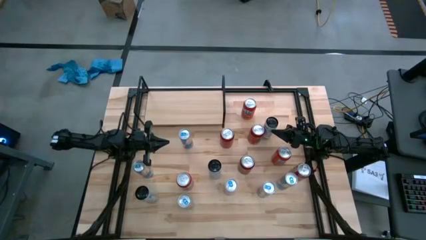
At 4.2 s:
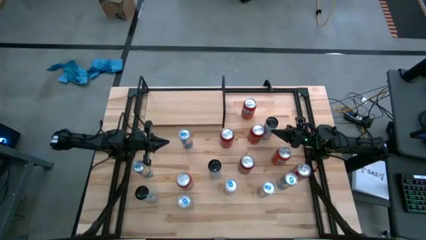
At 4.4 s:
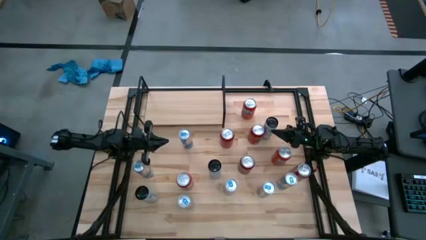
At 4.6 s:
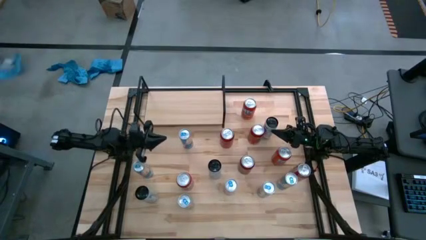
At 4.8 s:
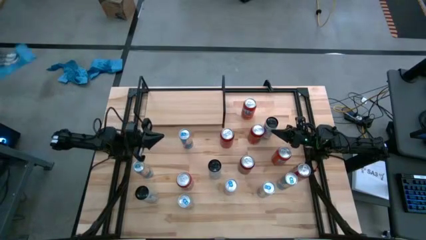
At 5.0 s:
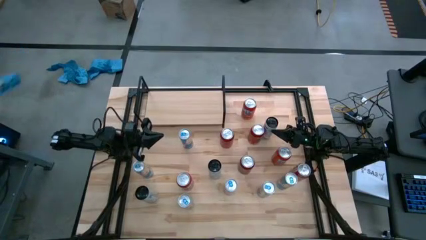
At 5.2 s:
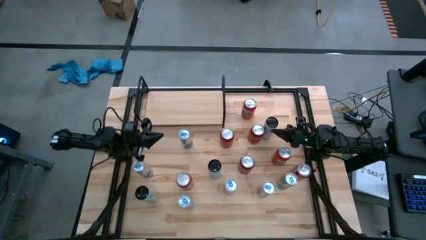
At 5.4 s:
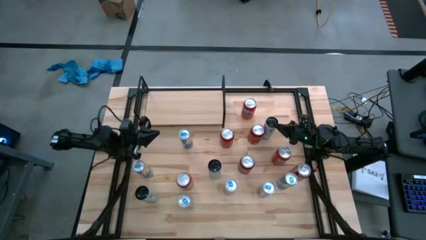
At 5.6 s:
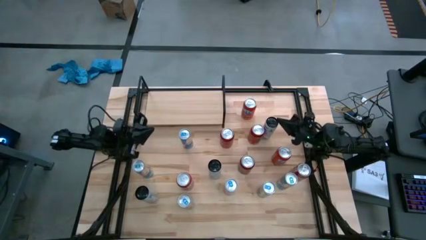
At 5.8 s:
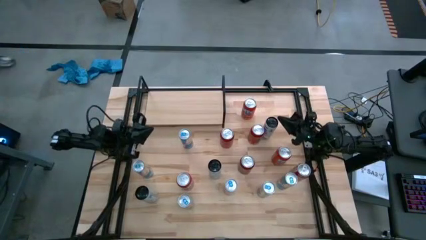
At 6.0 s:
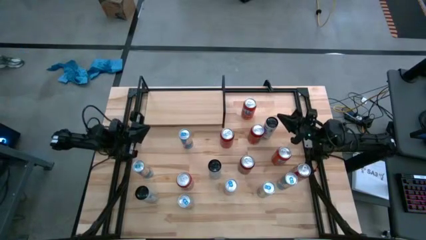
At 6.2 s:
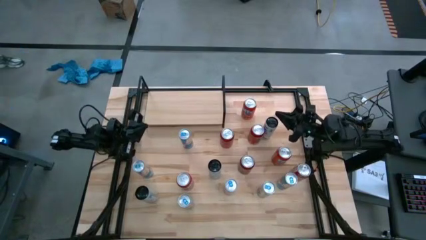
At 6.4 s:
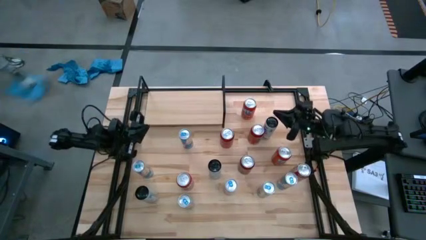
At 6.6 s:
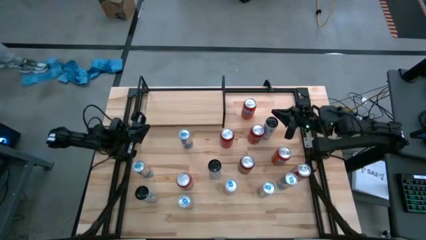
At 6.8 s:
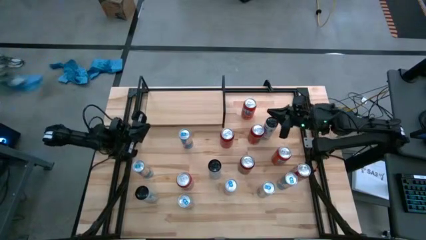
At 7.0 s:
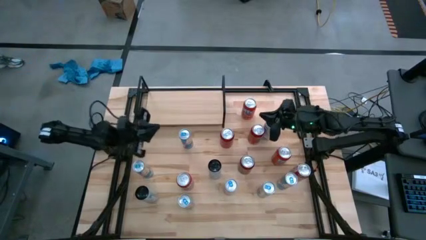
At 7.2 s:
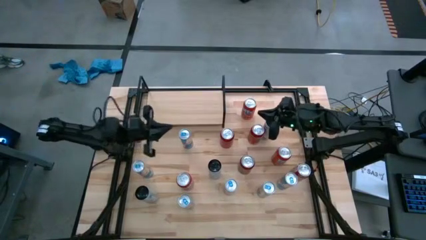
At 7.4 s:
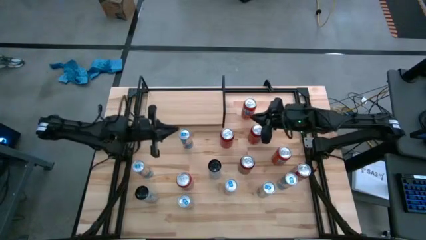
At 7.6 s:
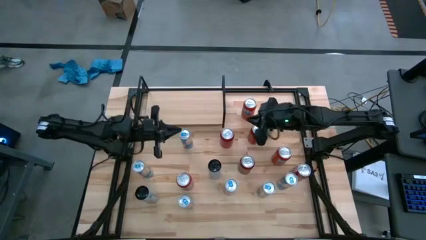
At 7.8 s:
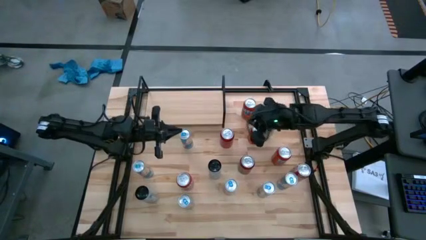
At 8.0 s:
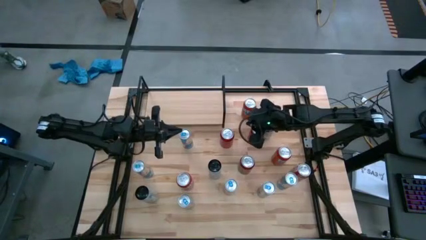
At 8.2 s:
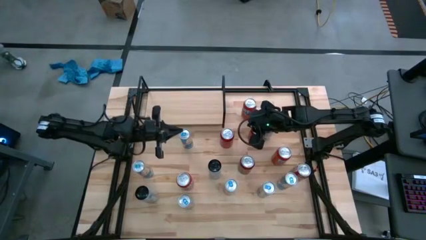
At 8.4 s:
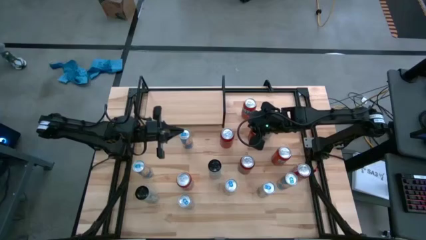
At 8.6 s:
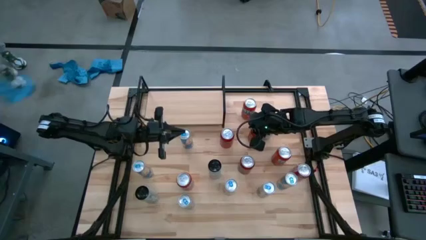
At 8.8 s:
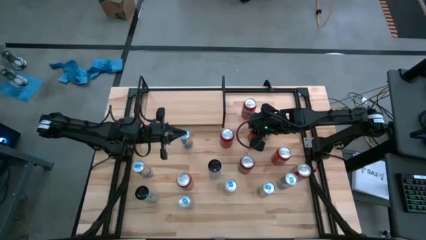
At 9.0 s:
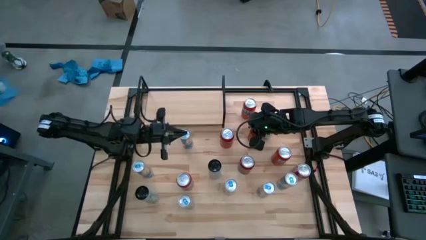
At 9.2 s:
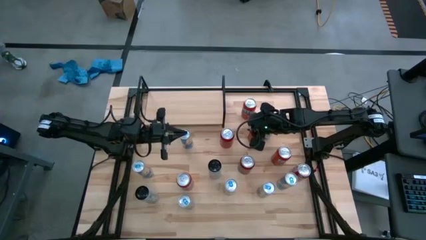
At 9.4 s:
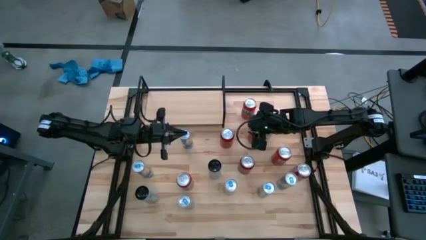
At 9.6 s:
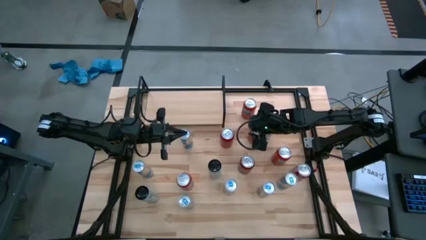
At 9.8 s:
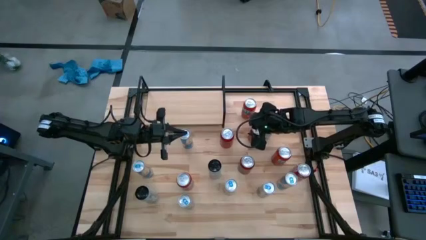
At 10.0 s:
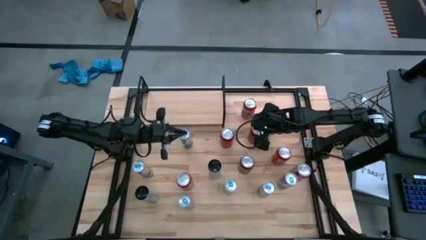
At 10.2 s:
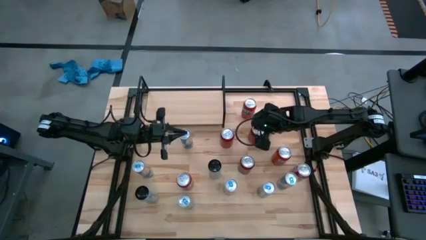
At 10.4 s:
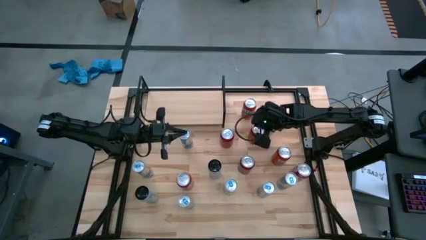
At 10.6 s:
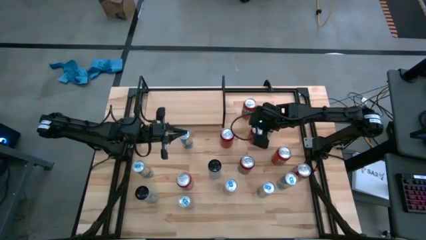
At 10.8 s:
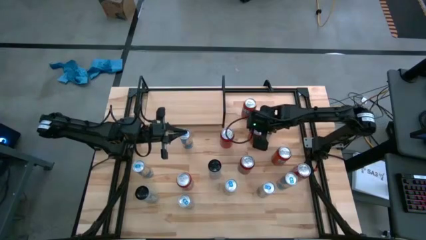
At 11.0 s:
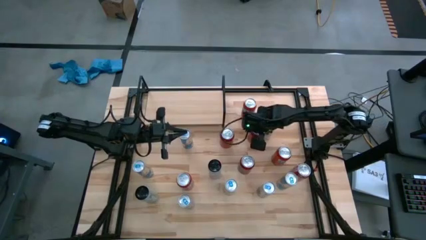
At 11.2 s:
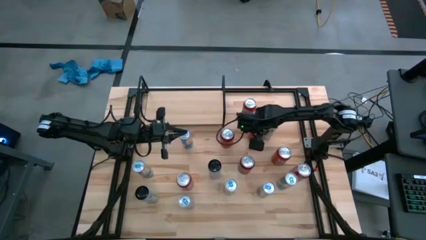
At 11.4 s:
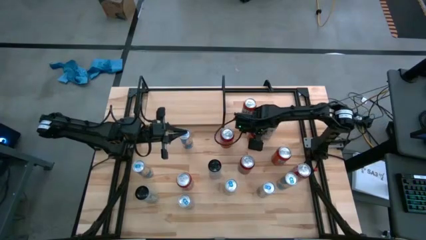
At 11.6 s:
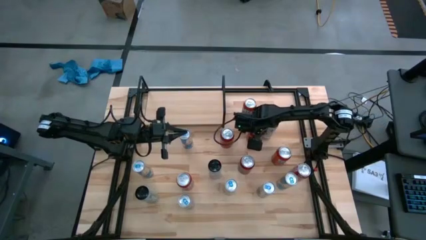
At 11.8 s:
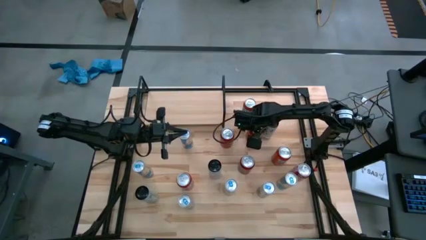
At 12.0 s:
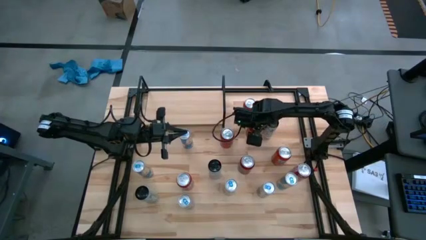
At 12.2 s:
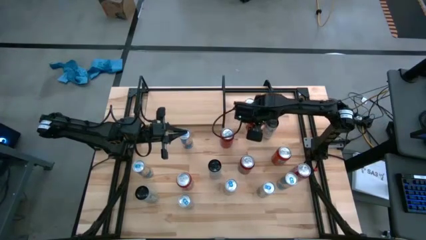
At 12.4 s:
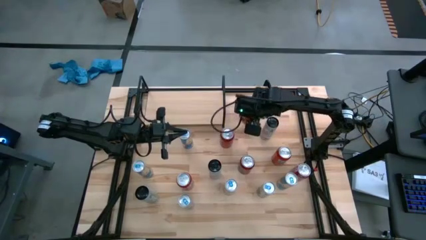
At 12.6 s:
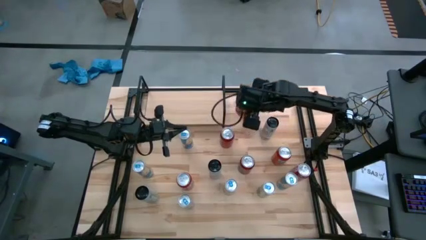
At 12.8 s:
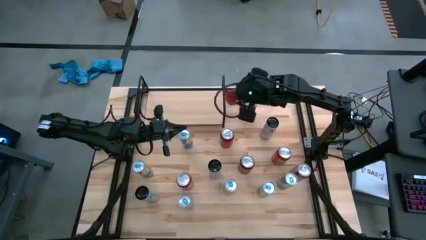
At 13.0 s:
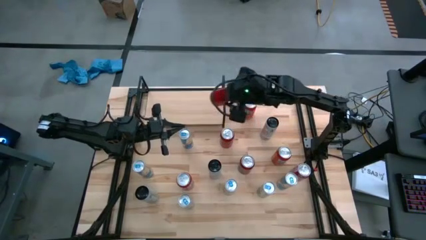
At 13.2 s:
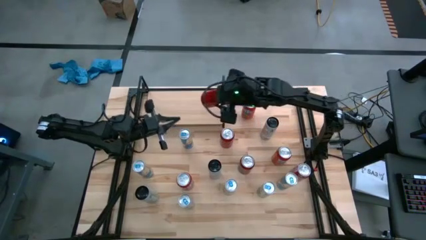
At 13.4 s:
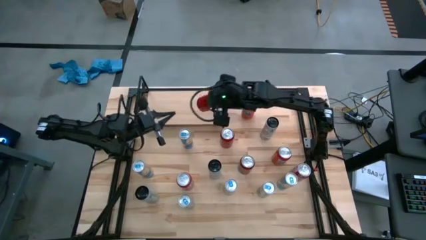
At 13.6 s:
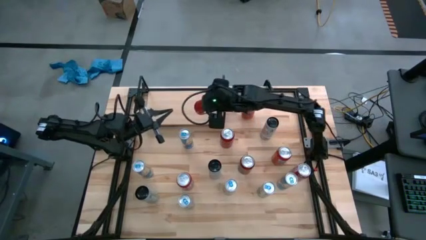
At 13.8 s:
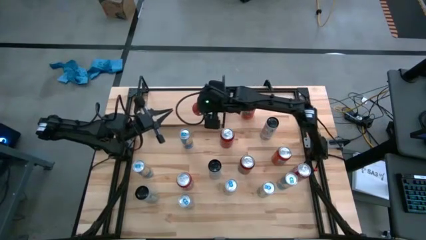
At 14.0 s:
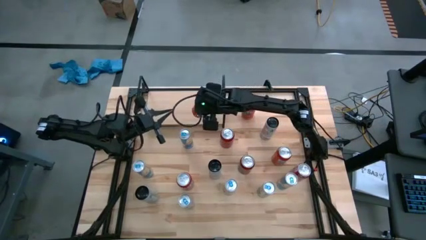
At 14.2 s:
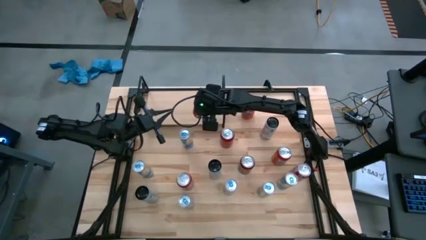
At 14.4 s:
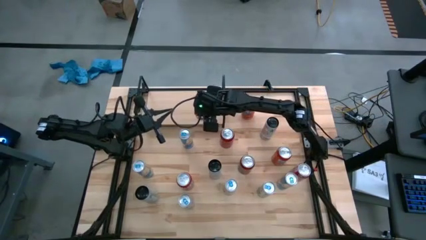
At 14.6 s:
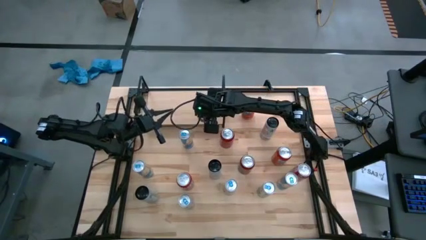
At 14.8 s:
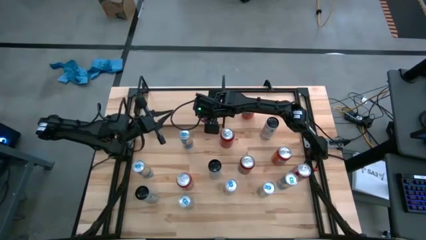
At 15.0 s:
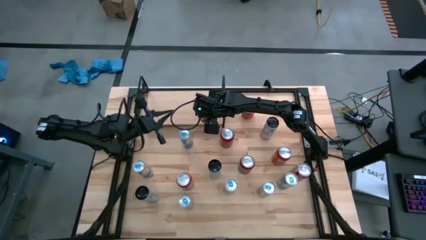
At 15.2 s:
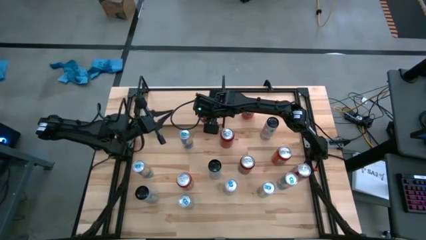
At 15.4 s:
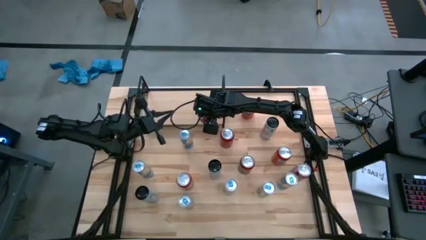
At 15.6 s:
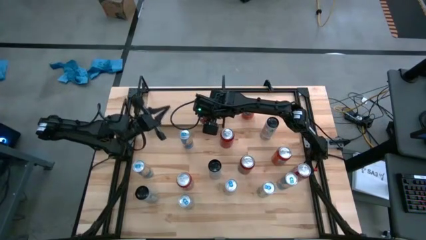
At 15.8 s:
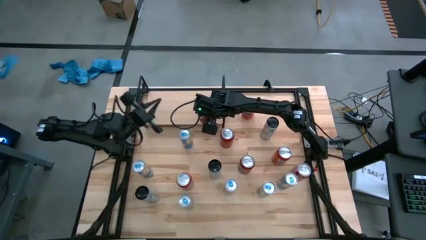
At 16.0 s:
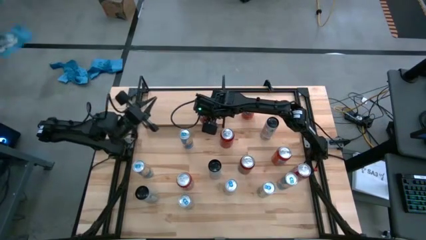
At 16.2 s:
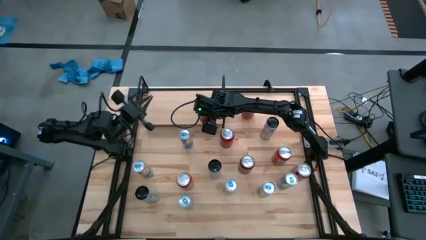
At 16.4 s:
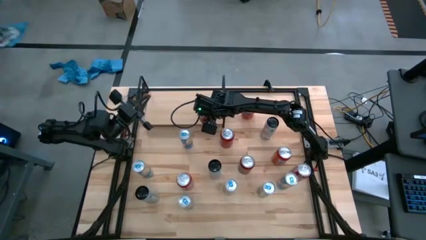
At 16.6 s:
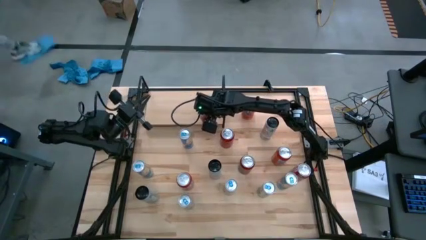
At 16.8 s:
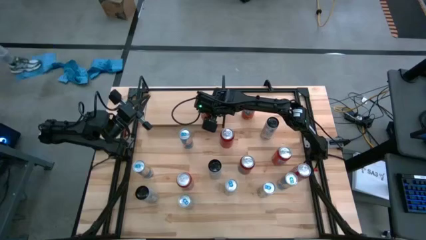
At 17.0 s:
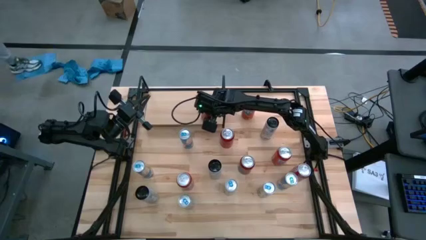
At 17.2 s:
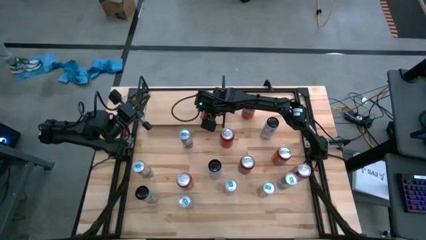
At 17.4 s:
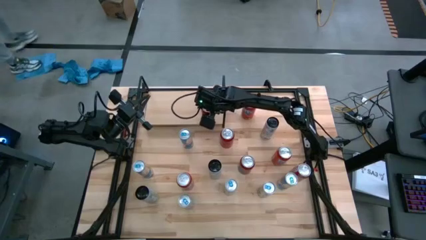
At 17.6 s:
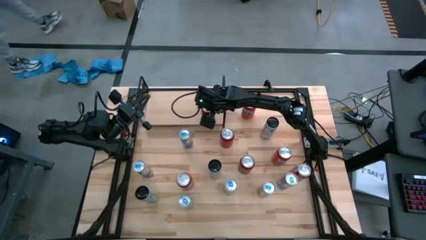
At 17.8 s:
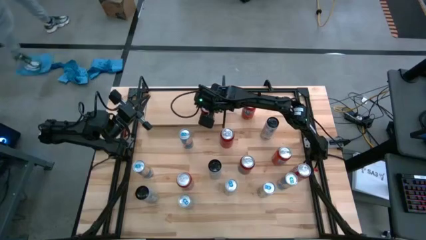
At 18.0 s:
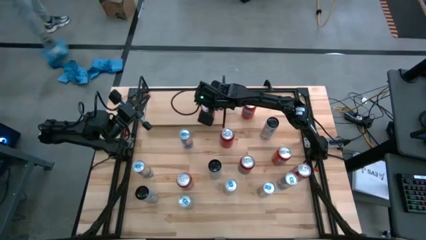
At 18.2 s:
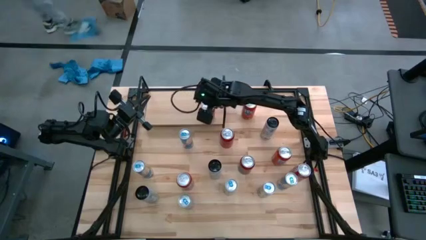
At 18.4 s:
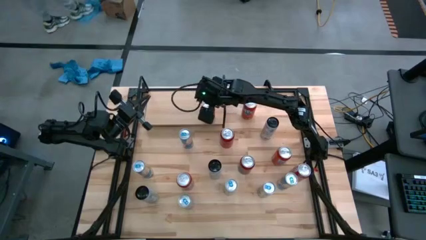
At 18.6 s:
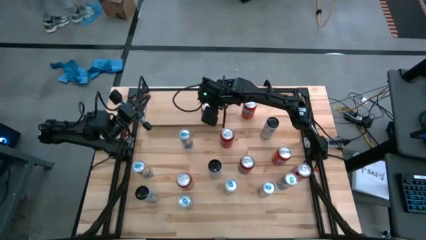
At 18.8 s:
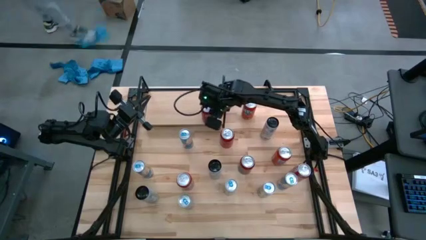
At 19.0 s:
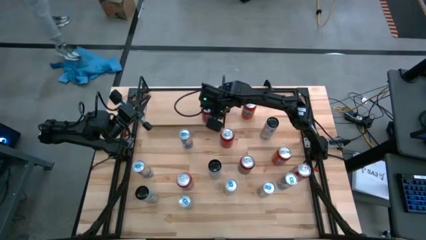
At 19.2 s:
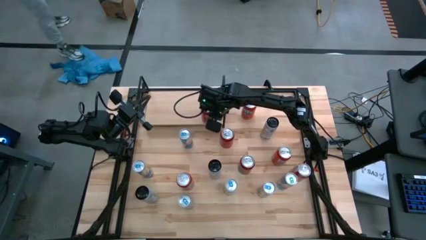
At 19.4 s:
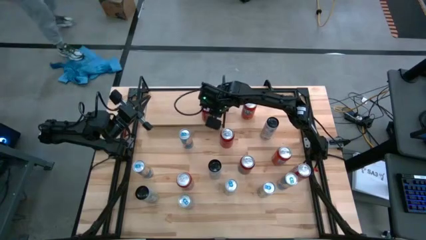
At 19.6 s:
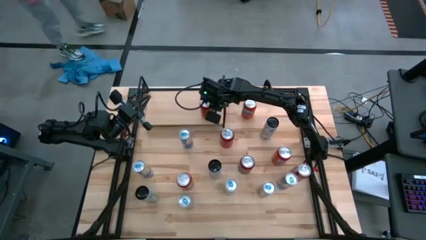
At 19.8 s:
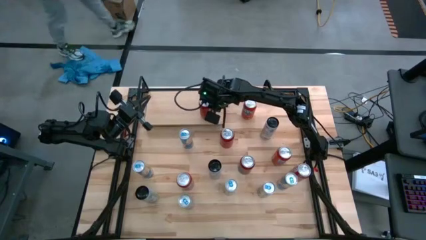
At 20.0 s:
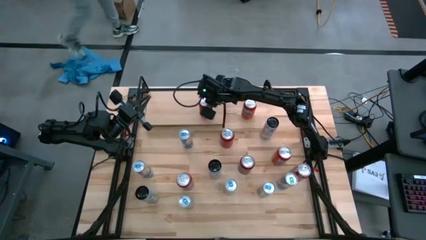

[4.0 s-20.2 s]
Task: Place canned beverage on shelf
Put the red/black soda can on the shelf
